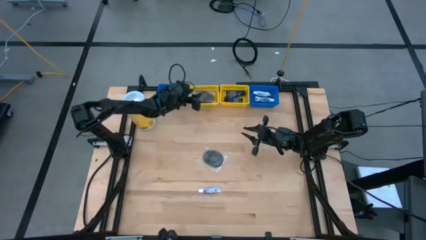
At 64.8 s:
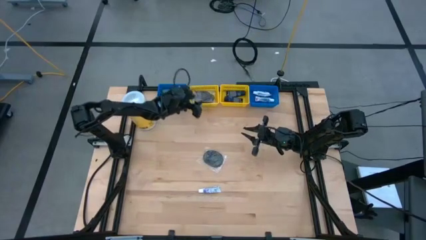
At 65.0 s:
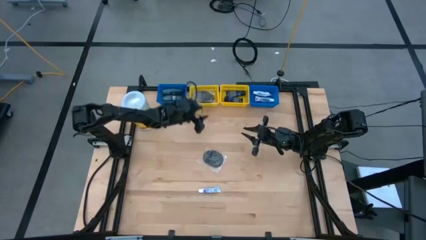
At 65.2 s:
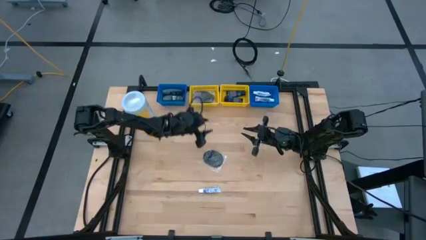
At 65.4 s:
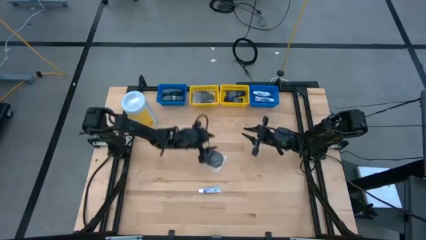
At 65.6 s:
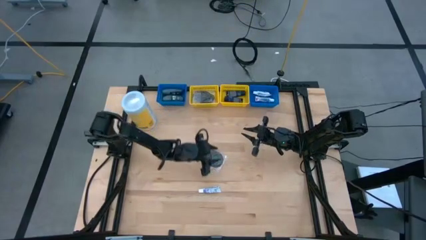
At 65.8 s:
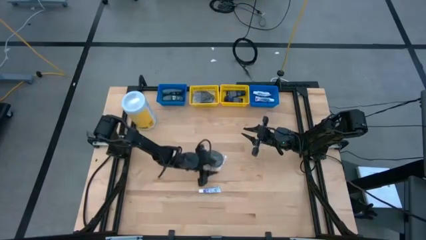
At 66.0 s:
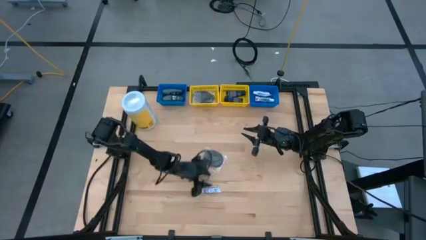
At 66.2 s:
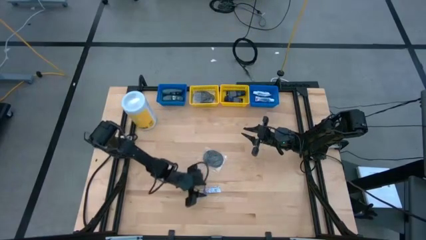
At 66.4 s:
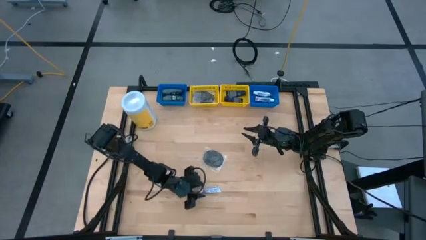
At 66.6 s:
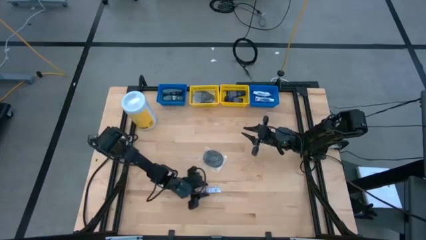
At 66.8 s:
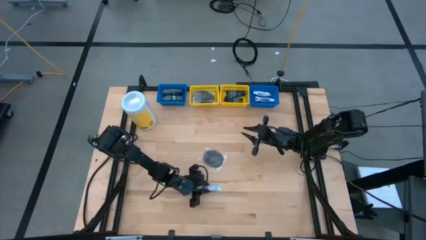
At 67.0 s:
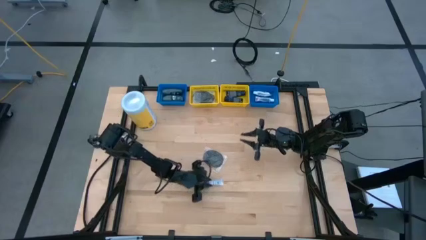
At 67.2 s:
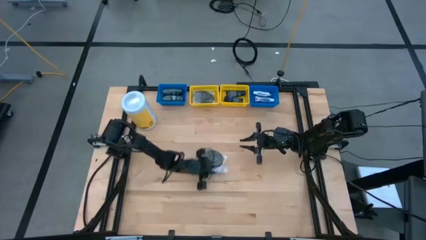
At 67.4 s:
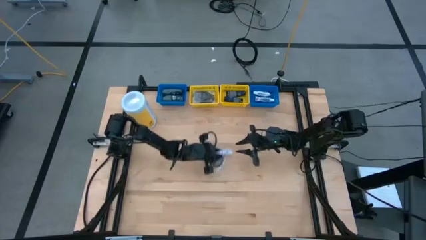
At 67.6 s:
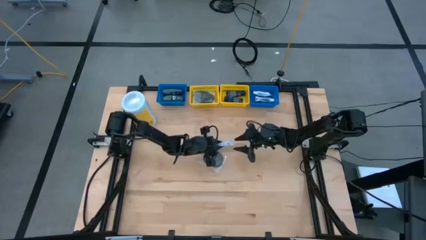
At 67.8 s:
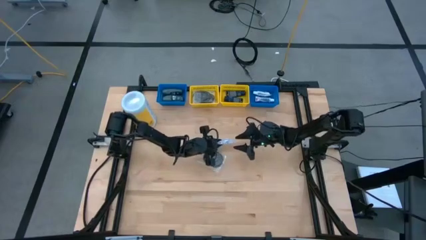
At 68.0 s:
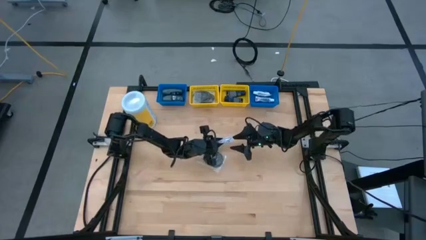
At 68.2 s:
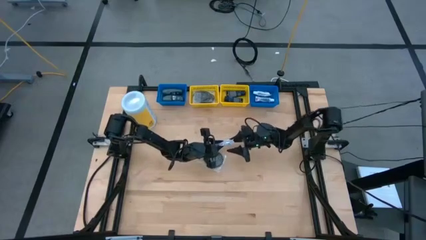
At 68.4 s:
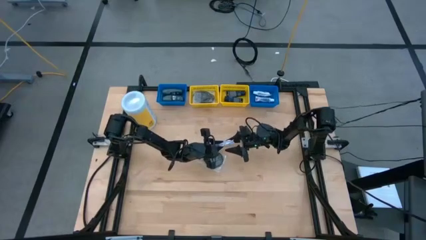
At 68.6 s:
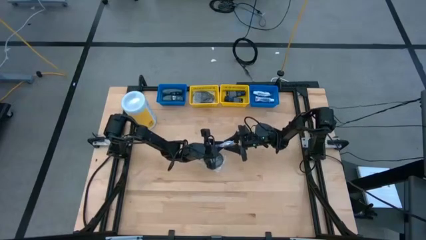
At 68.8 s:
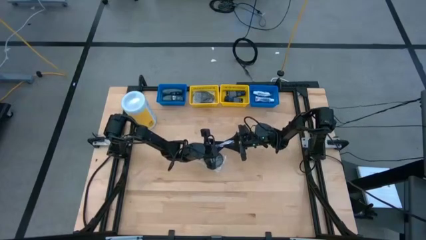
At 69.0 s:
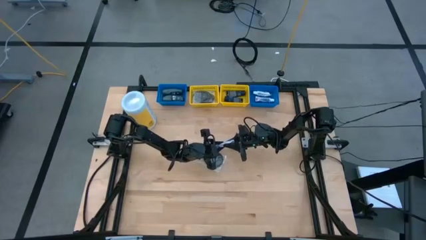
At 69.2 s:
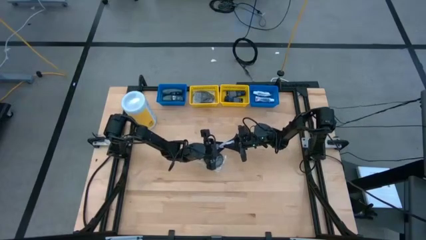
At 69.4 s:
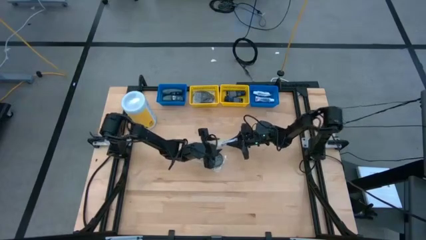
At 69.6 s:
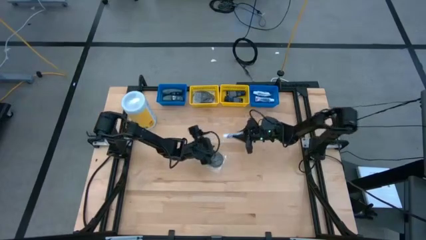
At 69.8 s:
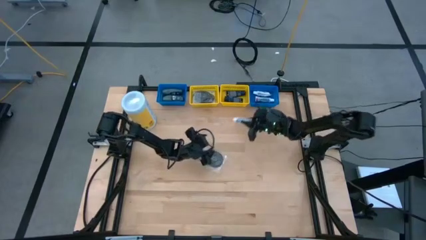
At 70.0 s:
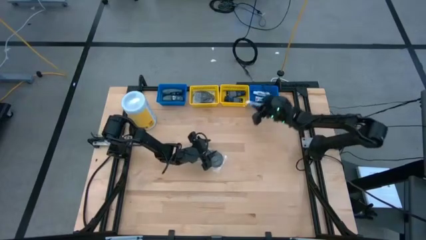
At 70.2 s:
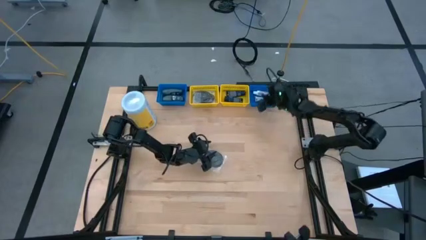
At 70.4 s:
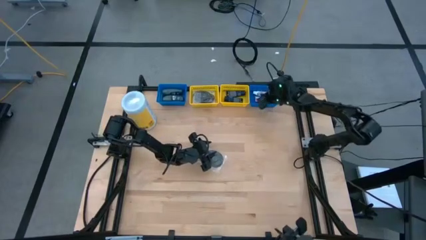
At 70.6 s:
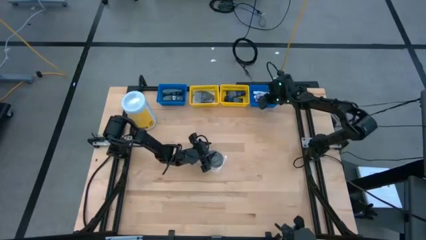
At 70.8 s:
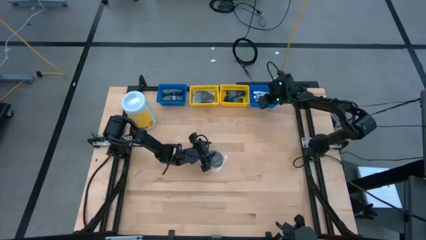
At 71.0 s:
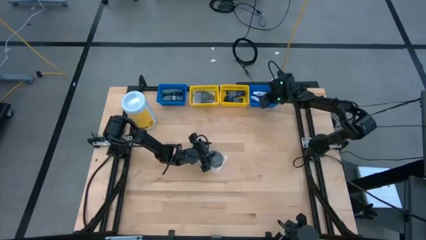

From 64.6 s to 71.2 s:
Task: Pick & Place Travel size toiletries
Put the toothpaste into the right blue bin

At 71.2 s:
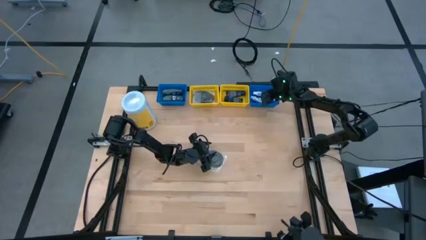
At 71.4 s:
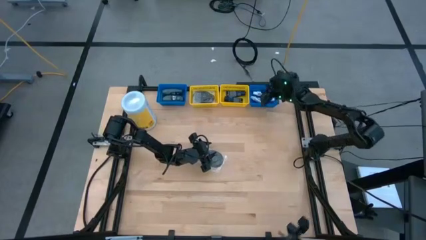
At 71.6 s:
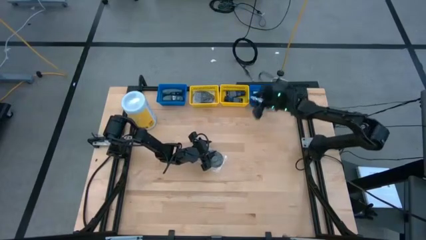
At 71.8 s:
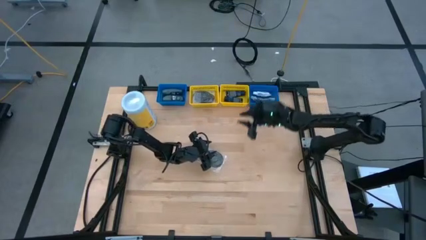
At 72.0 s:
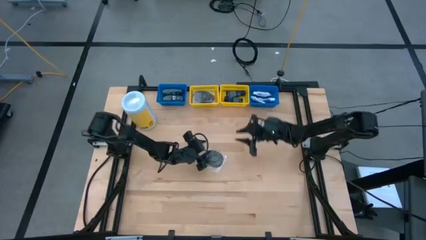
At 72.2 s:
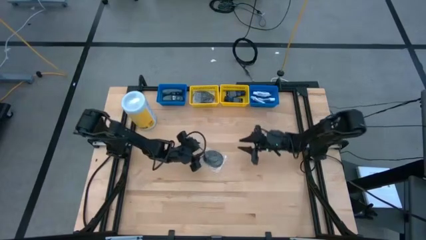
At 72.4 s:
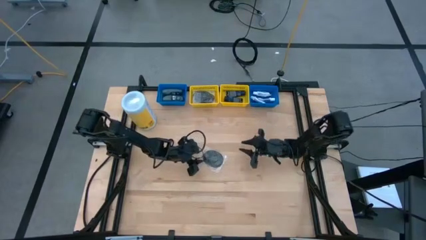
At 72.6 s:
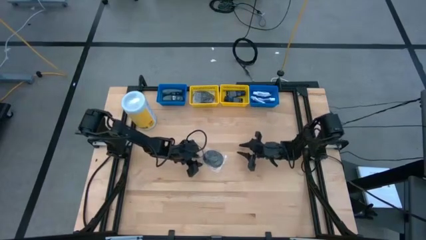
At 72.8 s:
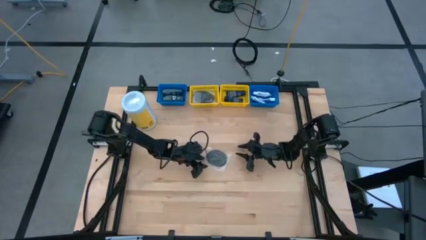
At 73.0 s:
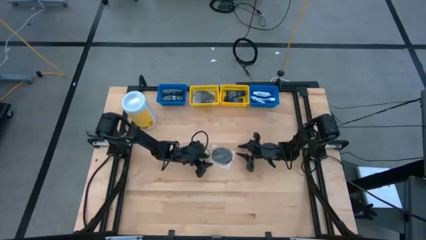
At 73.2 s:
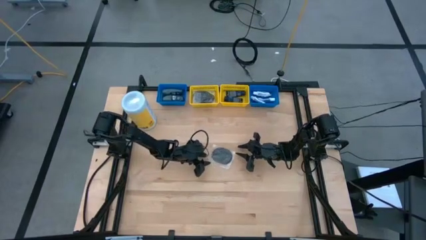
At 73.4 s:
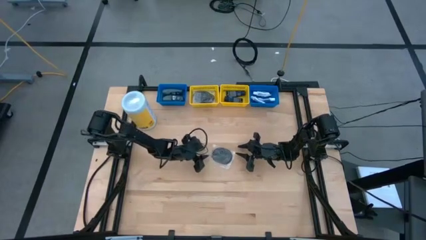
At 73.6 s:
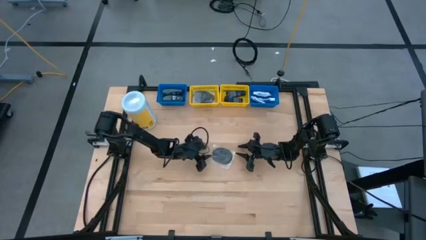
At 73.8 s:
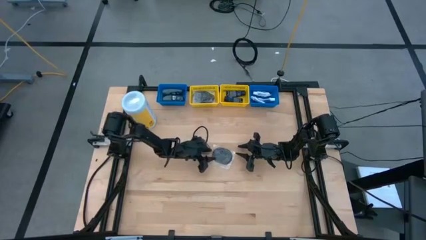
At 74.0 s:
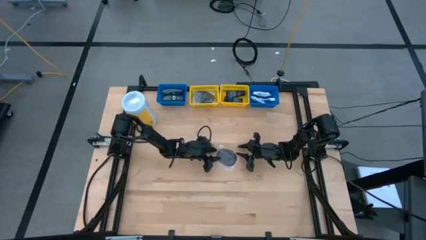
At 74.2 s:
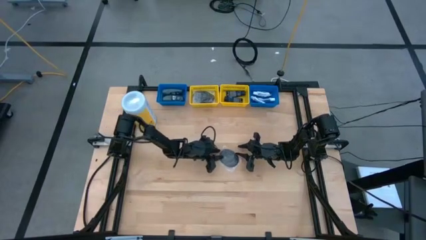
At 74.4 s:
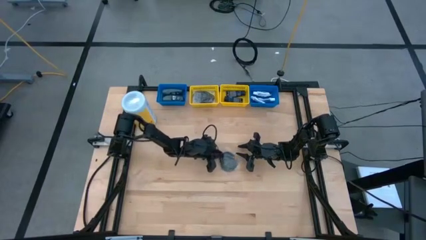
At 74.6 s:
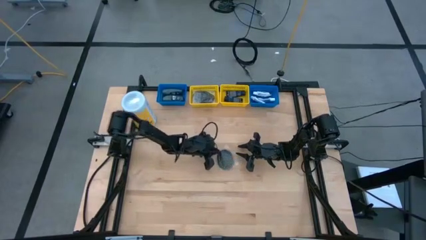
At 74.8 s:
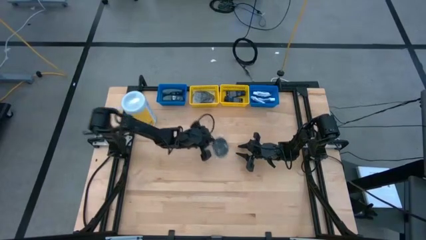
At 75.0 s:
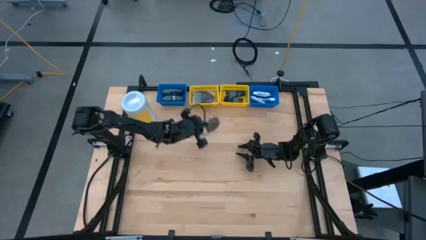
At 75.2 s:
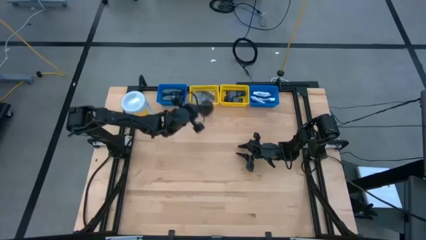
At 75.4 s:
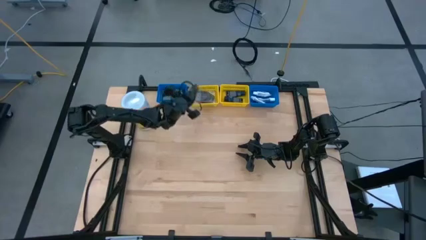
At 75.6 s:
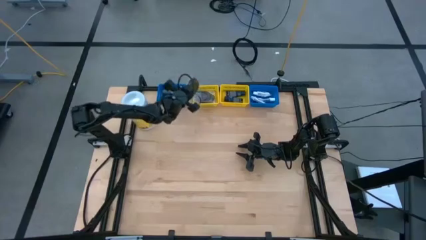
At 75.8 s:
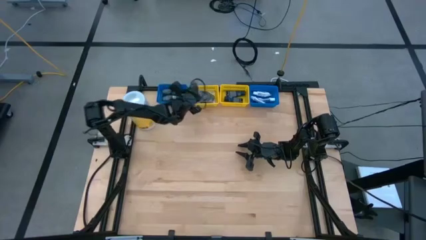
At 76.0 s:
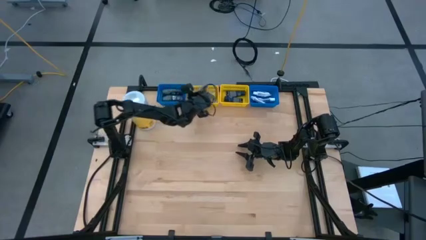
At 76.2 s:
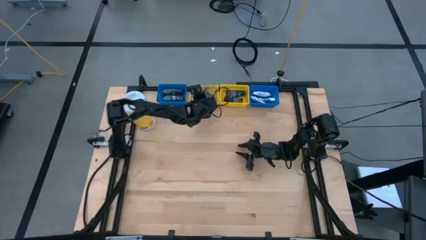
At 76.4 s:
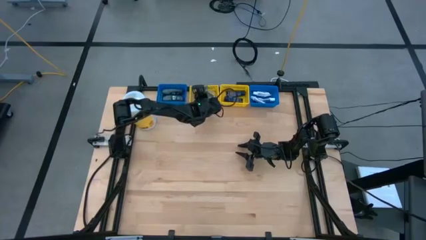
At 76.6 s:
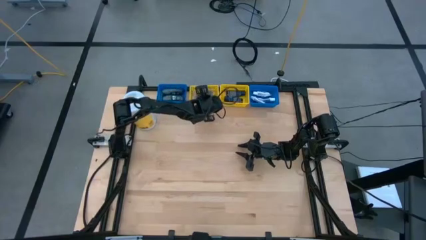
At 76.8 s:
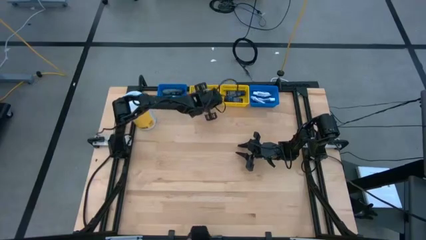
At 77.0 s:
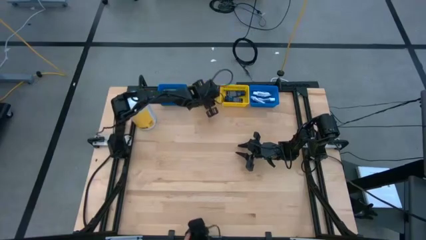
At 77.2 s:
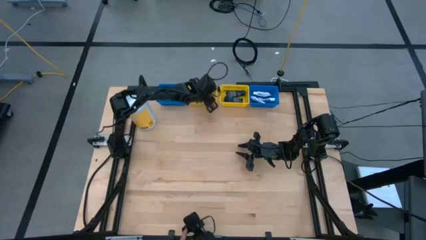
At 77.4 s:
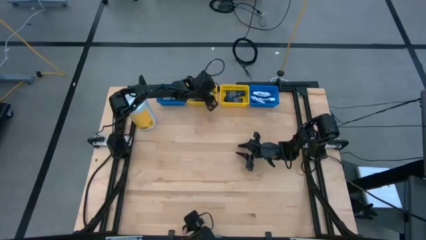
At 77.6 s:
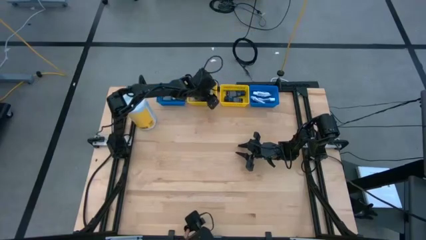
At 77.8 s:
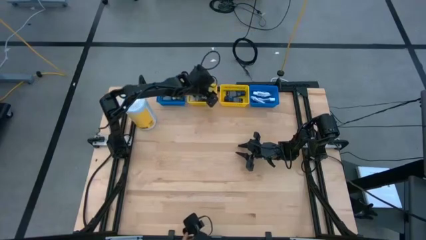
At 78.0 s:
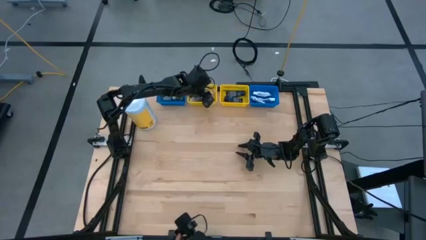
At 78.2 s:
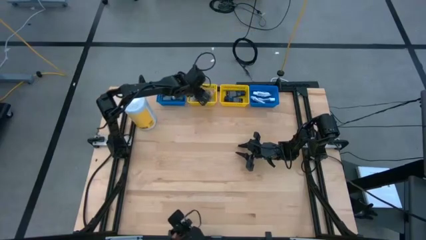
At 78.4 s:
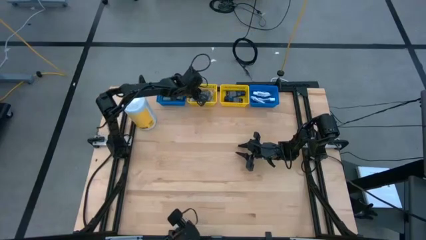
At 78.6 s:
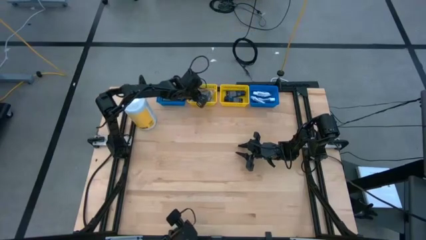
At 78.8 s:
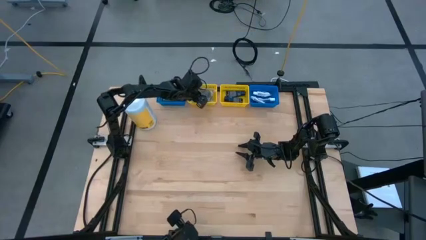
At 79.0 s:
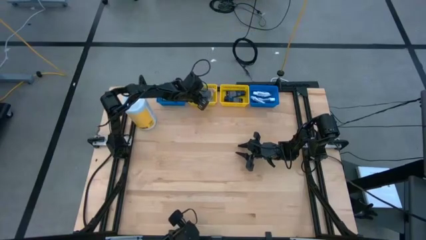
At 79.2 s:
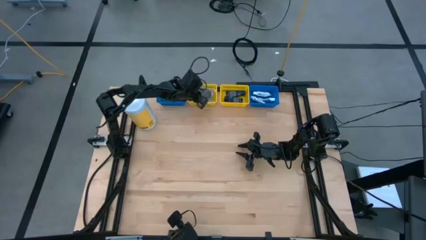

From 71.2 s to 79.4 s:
Put the hairbrush into the left yellow bin

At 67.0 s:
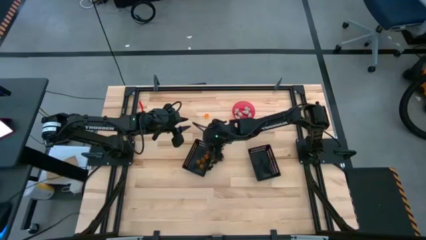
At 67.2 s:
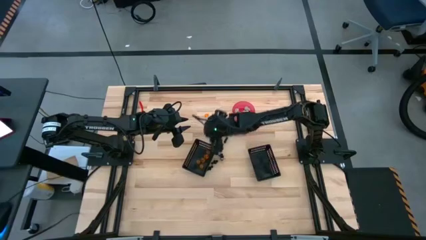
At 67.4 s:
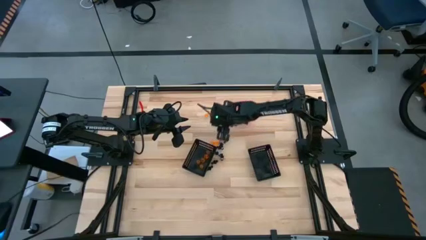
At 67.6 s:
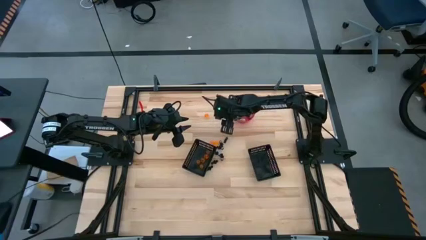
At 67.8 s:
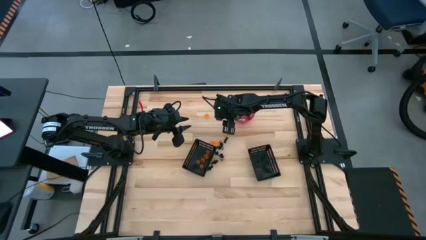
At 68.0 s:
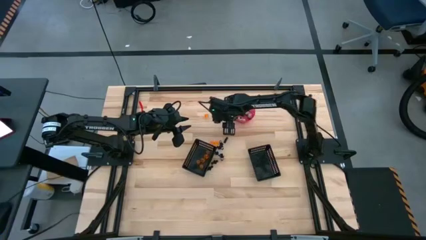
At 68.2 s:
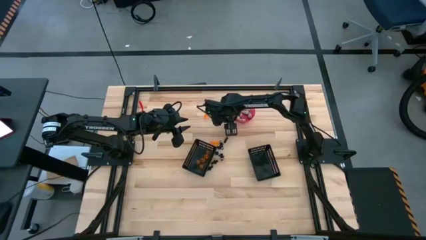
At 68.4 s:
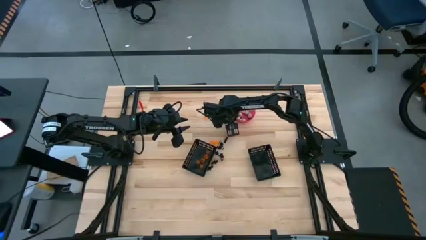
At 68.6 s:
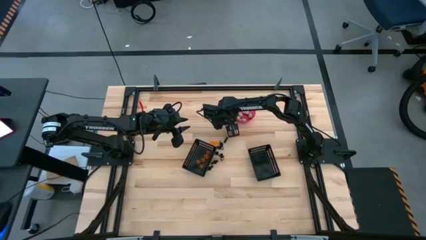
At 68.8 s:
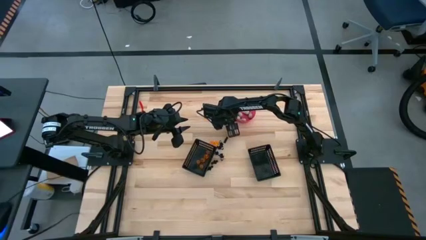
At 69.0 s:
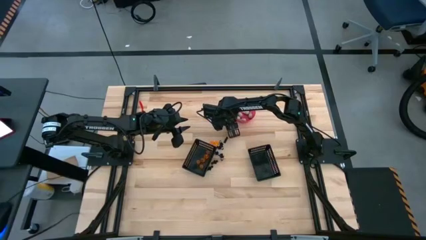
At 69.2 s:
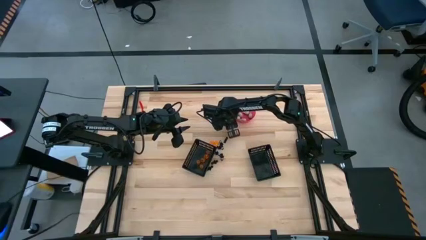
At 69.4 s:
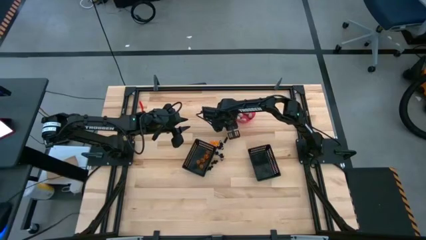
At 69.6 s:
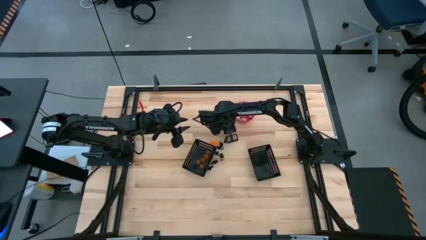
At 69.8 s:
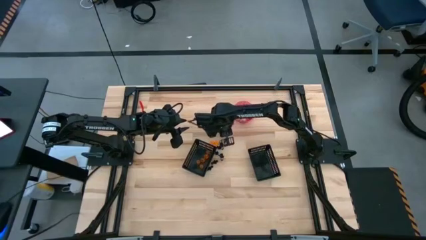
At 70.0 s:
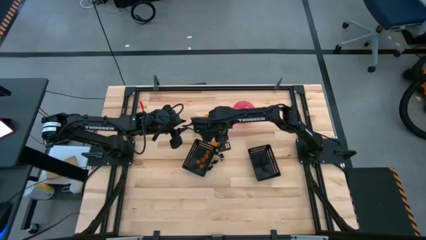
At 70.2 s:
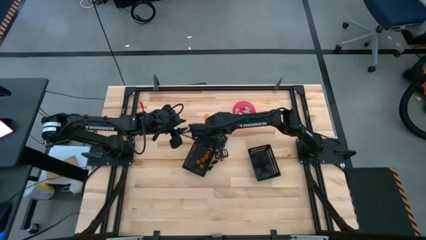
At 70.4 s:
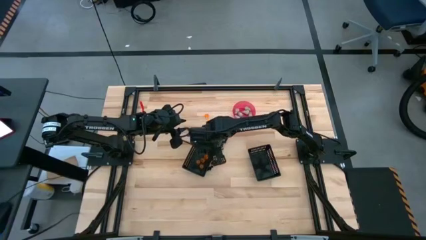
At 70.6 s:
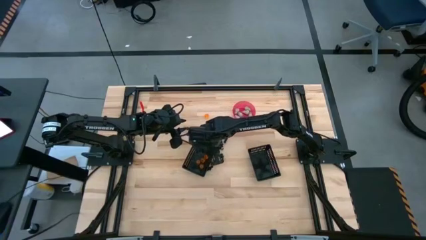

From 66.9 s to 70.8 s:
Task: Sort Halloween decoration
Put the orange pumpkin toy into the left black bin
